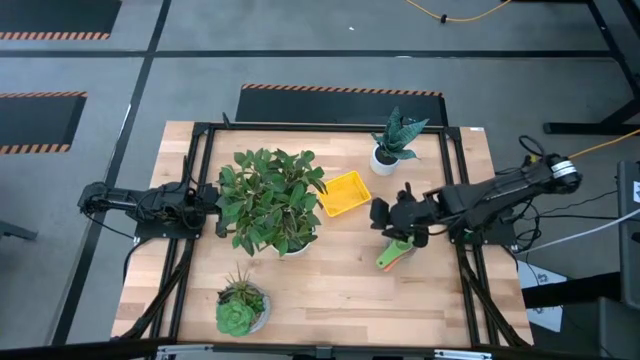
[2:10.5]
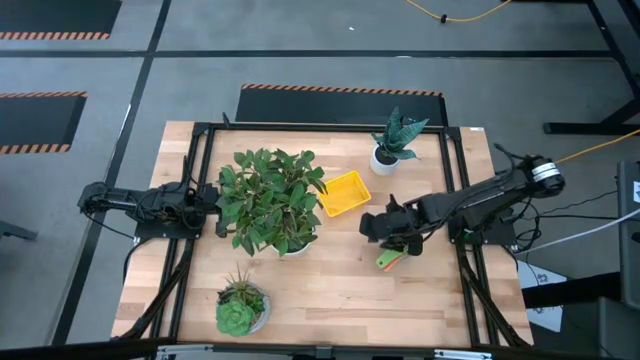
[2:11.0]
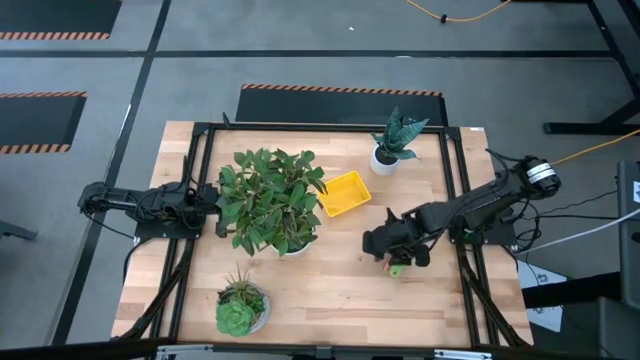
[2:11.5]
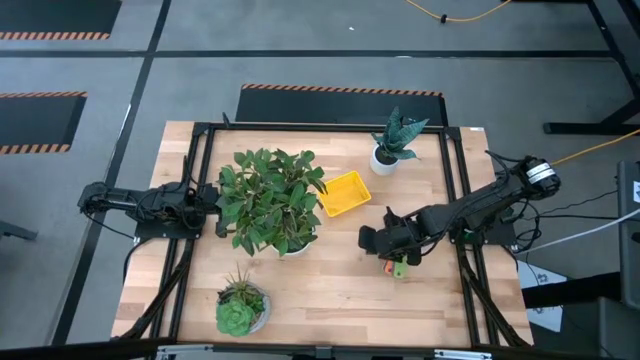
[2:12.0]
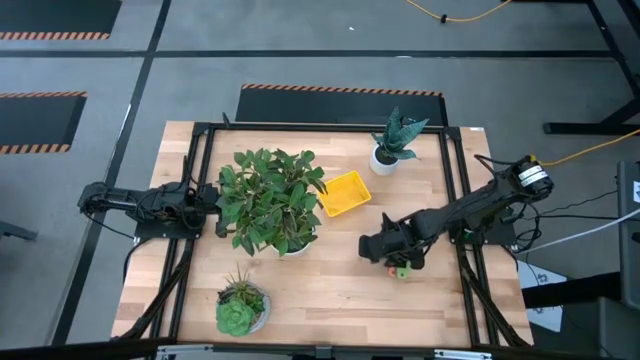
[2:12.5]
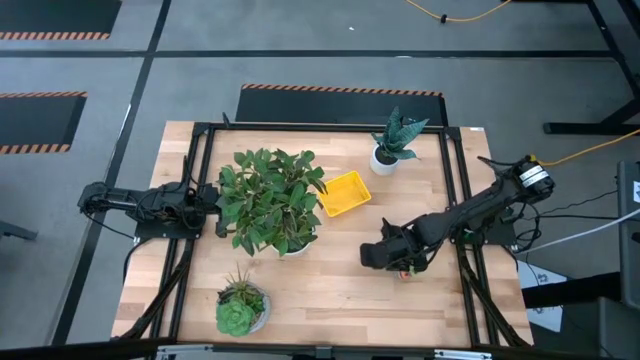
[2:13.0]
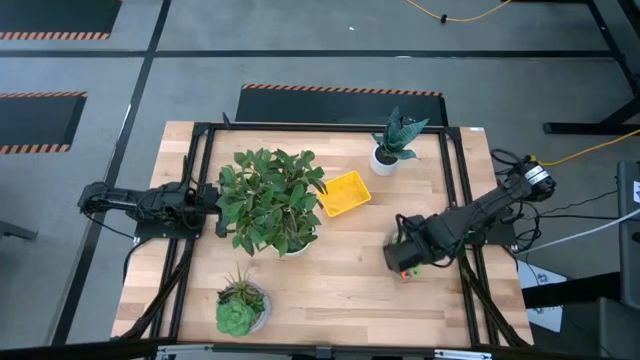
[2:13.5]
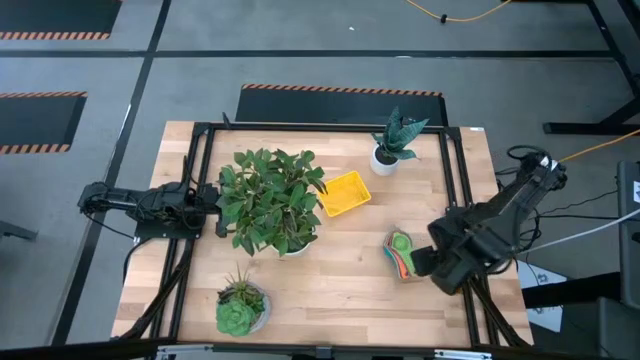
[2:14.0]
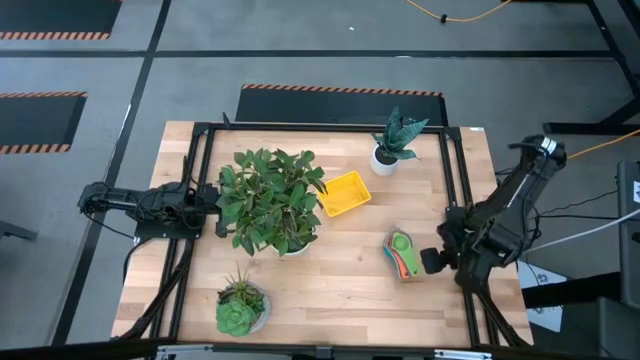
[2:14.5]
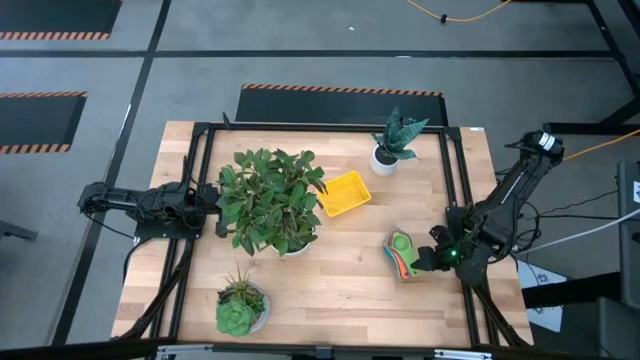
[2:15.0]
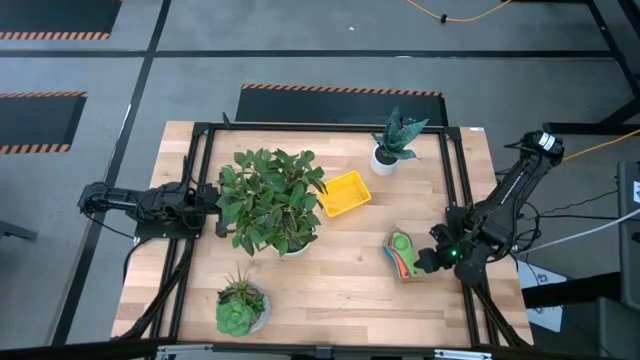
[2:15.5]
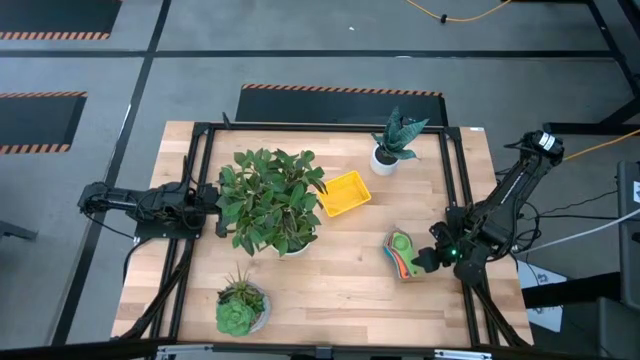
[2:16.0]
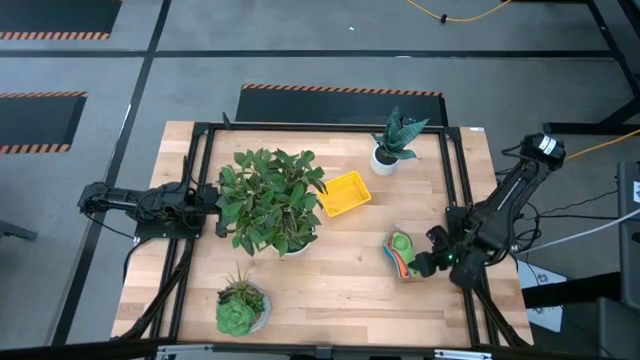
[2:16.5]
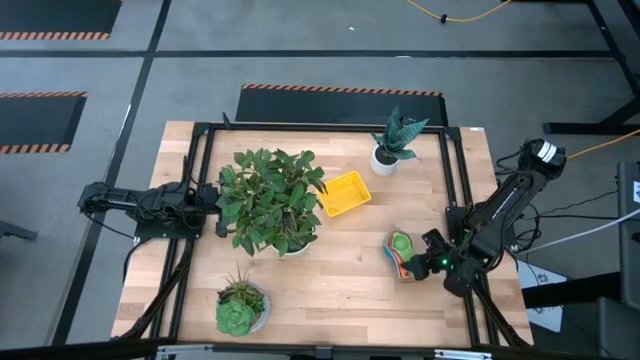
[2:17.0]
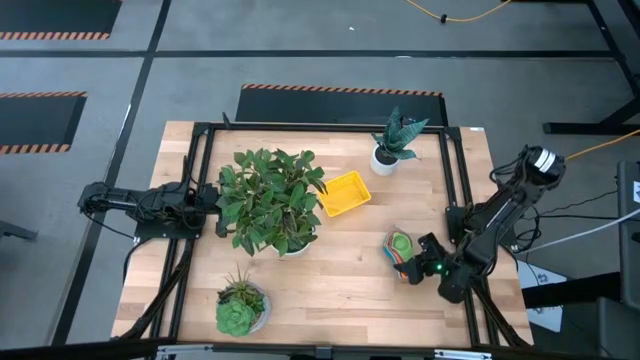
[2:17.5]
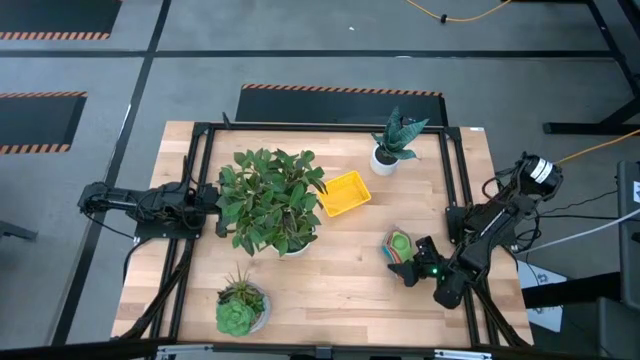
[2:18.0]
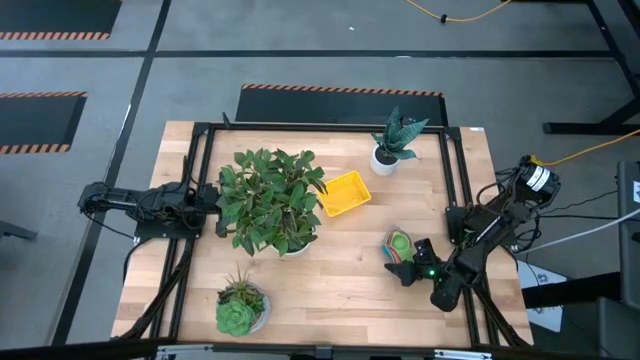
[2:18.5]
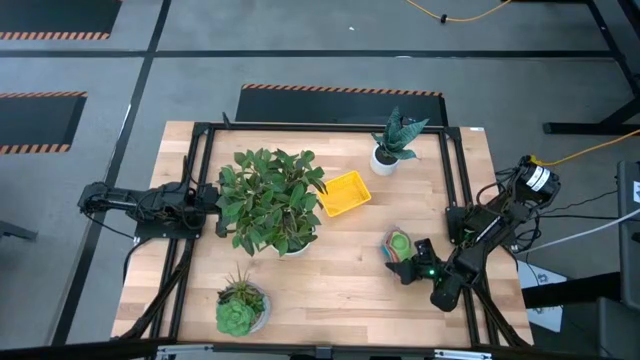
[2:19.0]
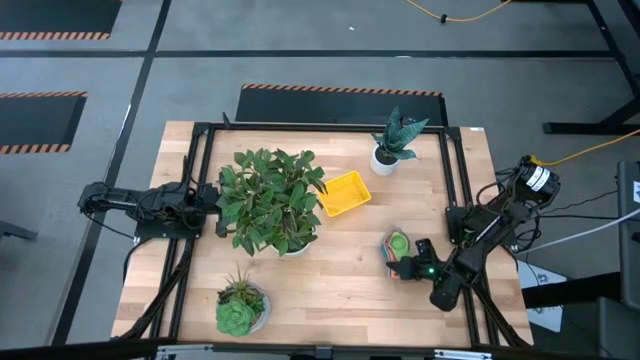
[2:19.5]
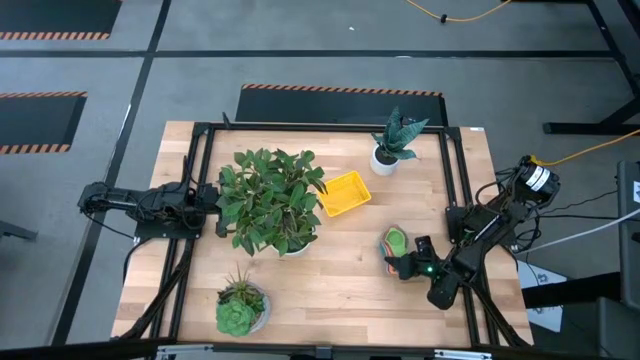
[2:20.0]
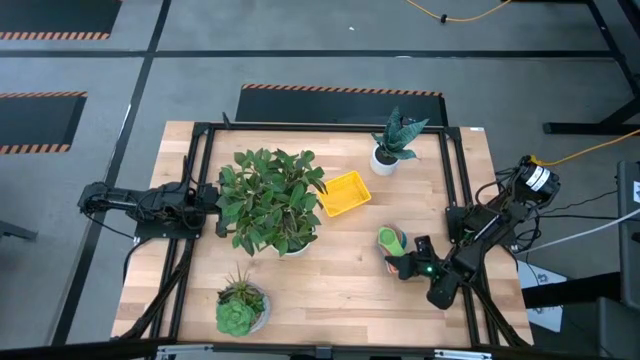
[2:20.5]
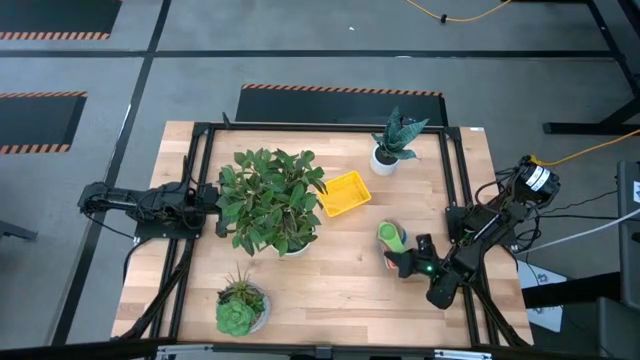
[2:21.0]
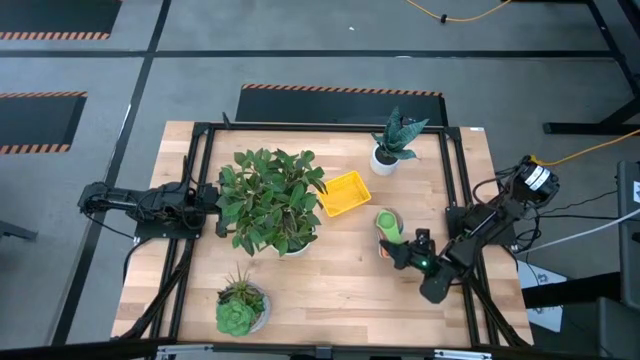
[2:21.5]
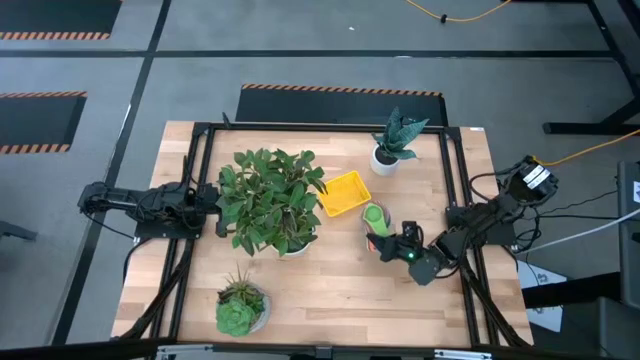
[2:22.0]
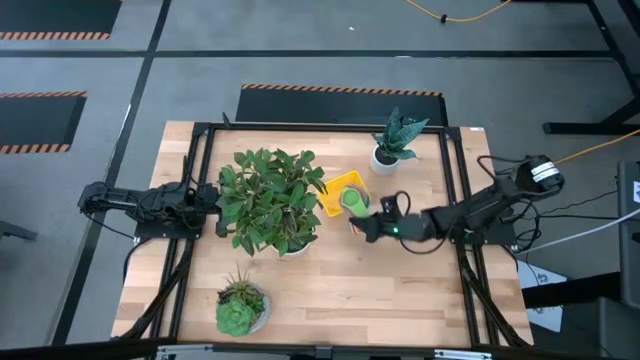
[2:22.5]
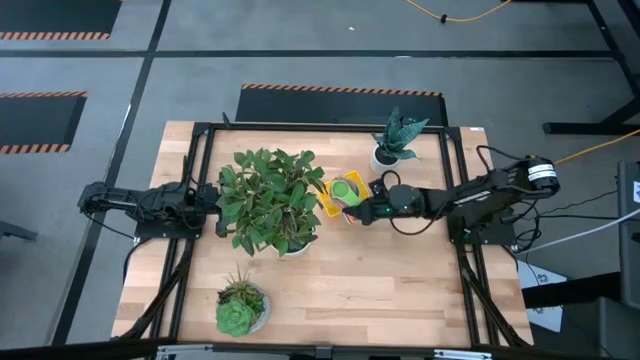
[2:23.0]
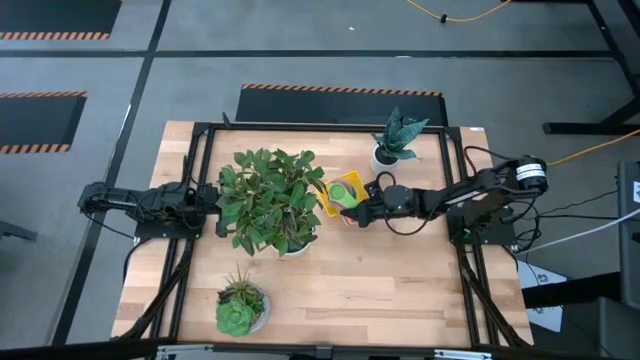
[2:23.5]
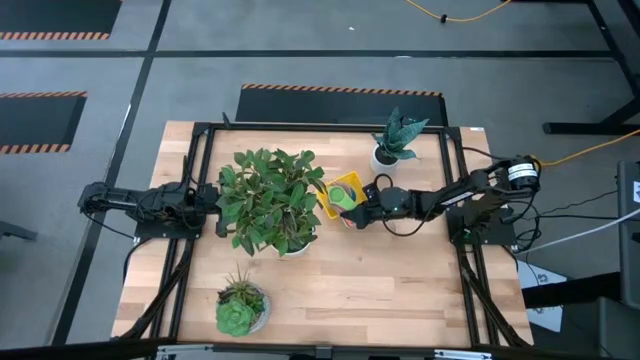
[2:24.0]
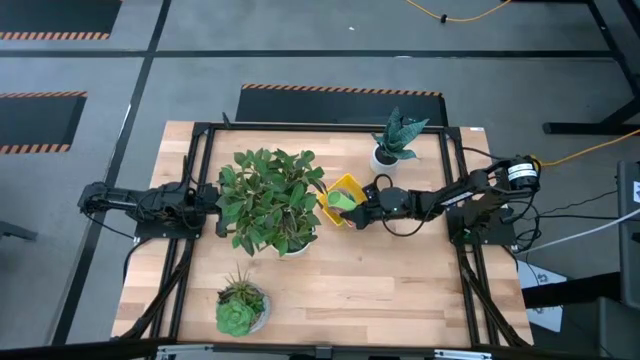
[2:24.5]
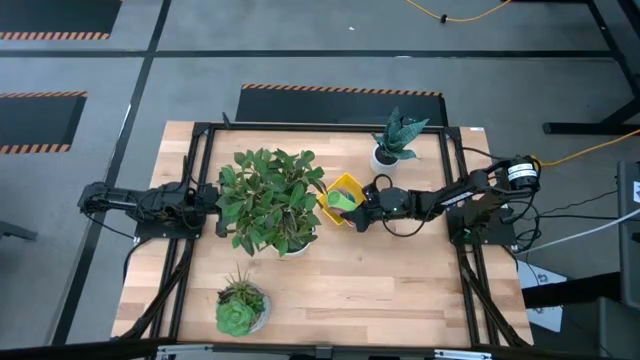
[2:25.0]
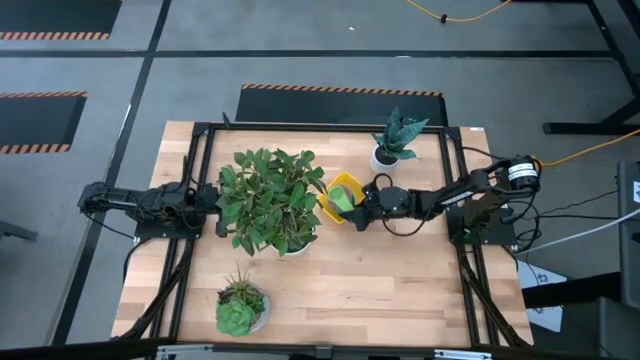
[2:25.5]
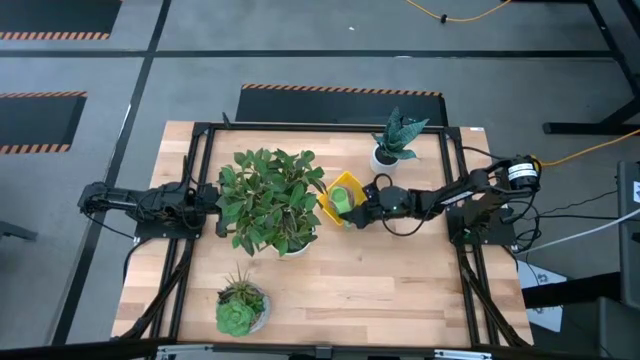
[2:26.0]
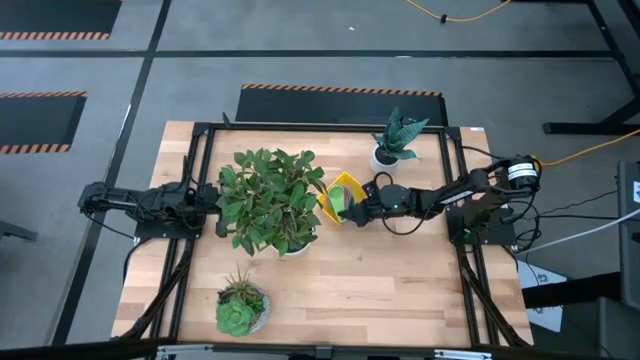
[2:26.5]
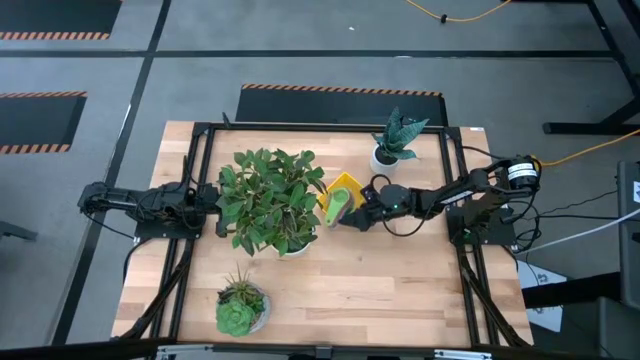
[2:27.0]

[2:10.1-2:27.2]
Task: Nest measuring cups in basket
Put the nested measuring cups into the yellow basket

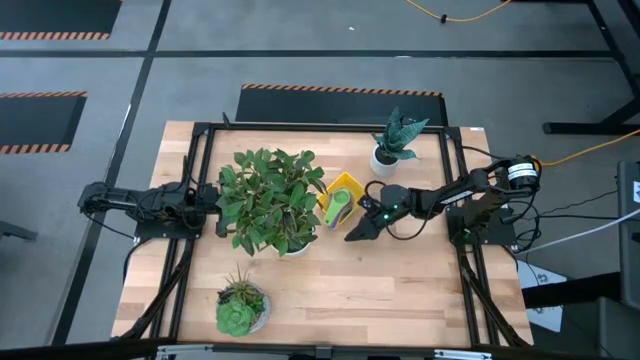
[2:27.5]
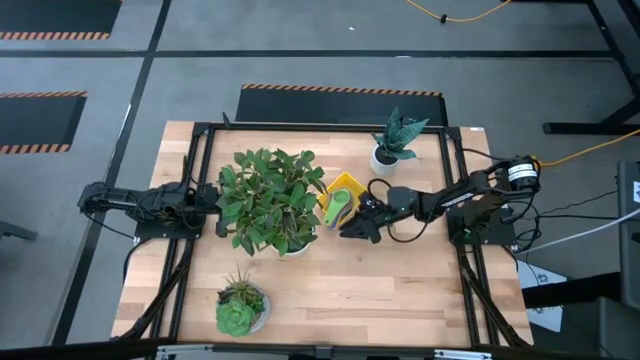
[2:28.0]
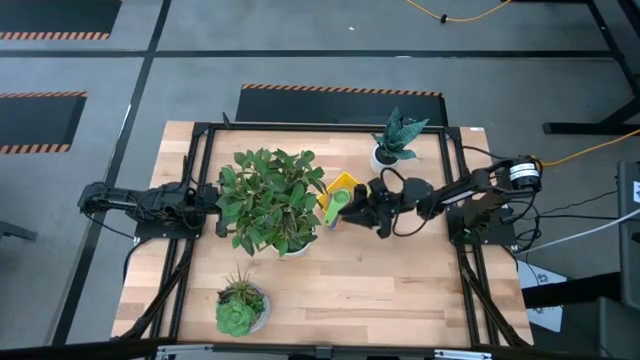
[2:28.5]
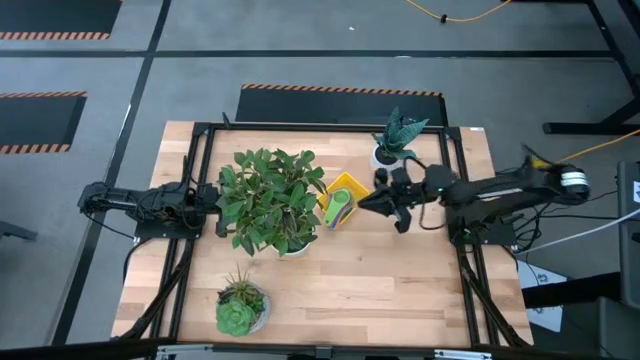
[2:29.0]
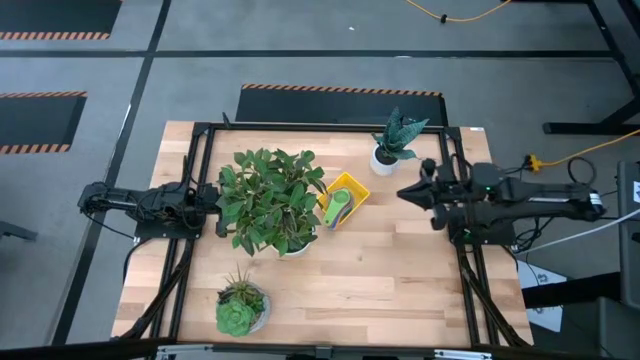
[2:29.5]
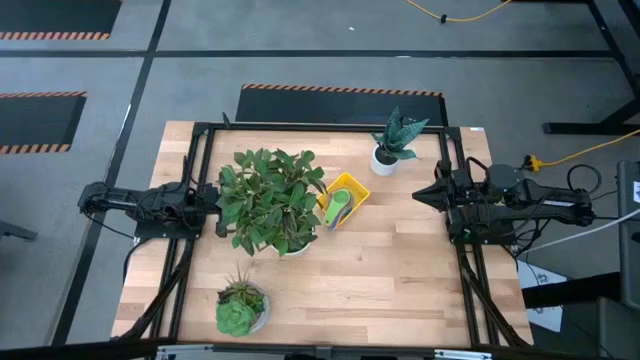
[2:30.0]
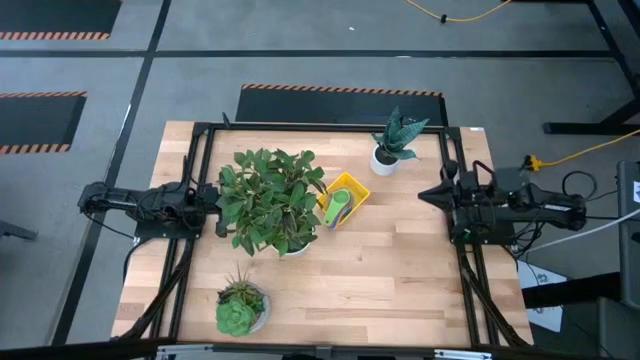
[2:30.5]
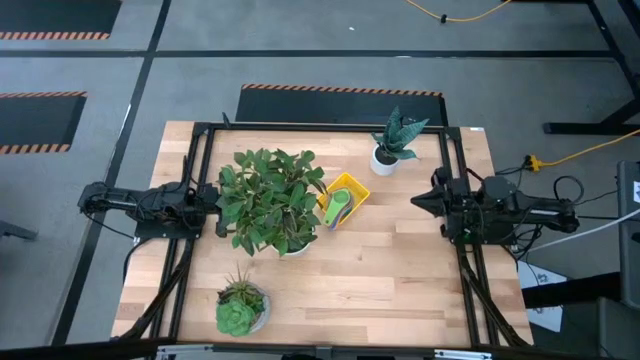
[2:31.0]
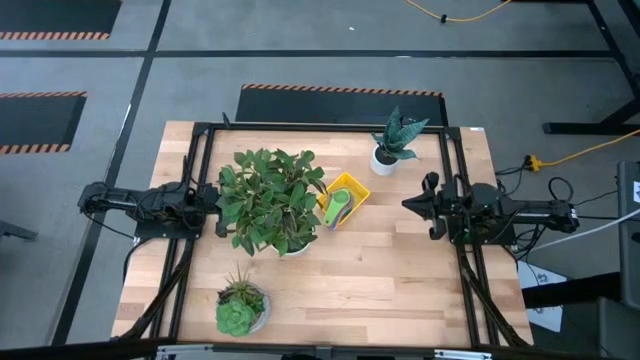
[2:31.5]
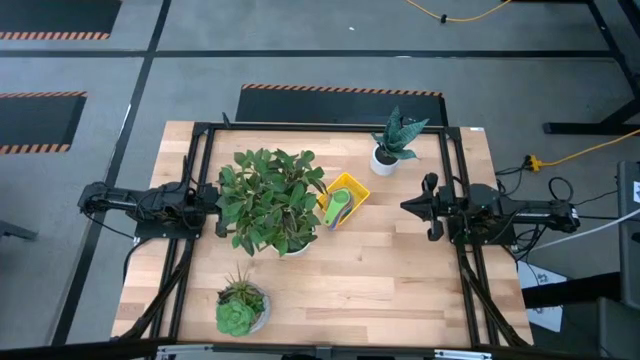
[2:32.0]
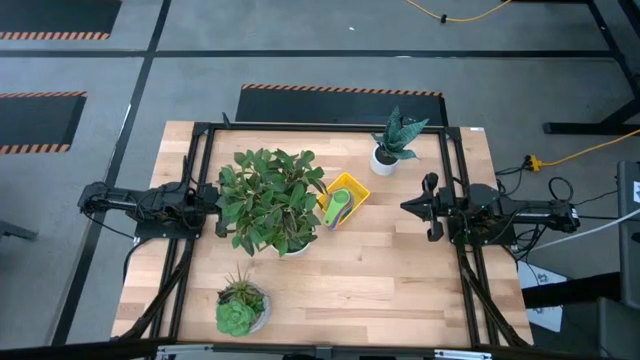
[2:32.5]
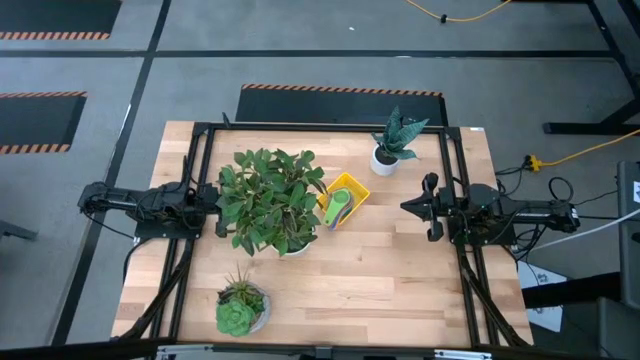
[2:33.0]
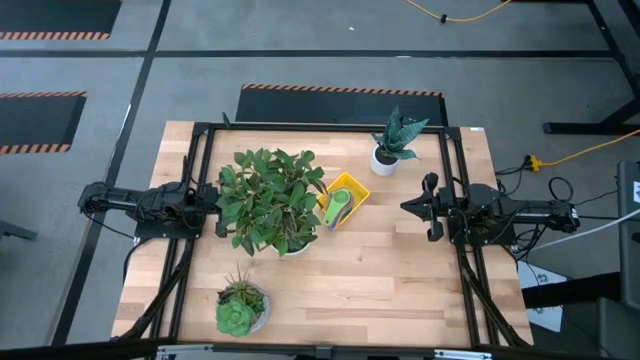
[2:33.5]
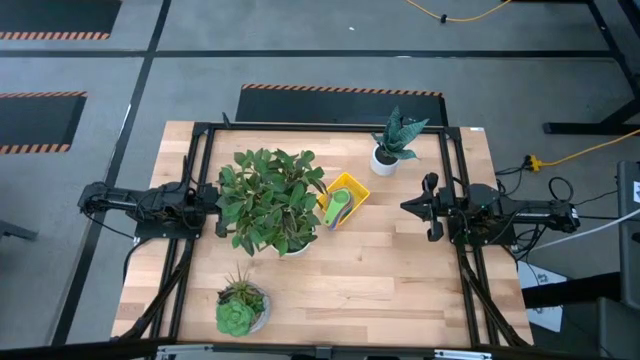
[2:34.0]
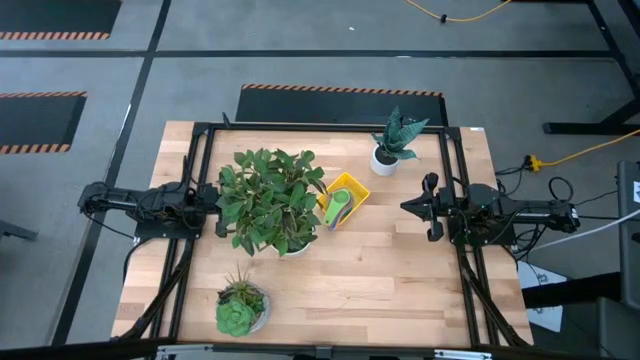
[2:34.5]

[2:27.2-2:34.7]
Return to Home Position
